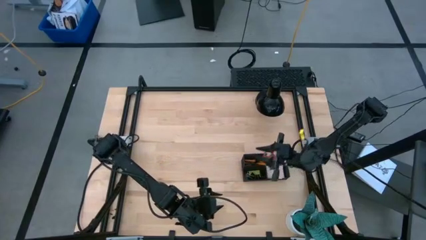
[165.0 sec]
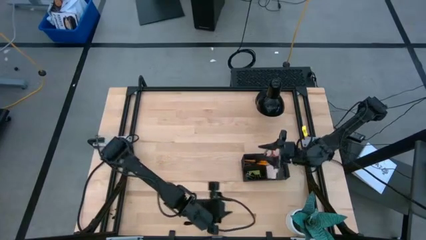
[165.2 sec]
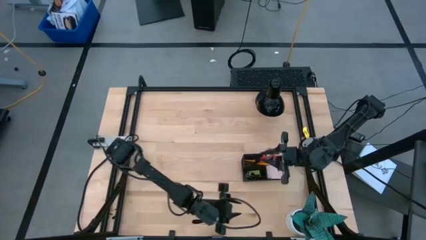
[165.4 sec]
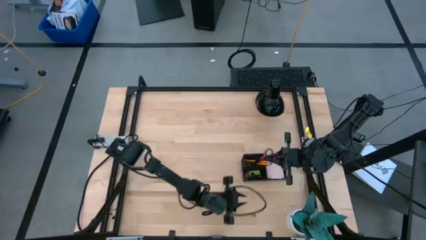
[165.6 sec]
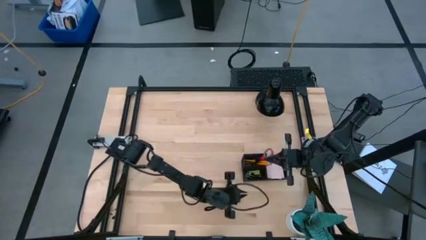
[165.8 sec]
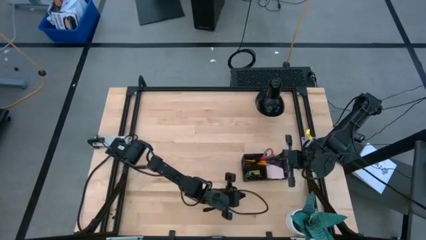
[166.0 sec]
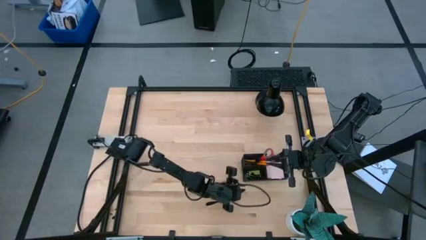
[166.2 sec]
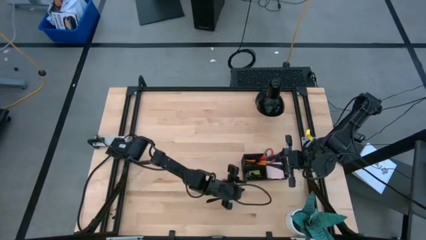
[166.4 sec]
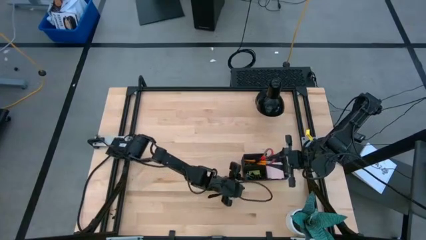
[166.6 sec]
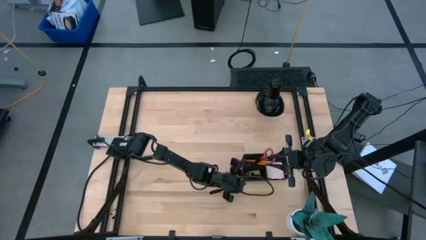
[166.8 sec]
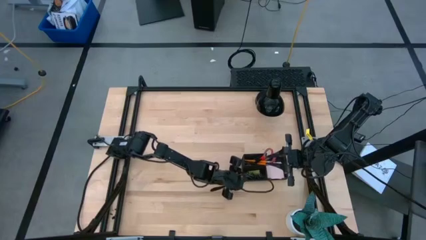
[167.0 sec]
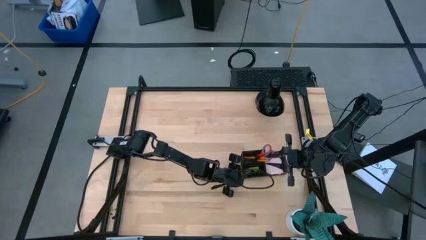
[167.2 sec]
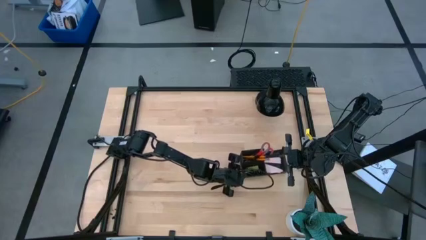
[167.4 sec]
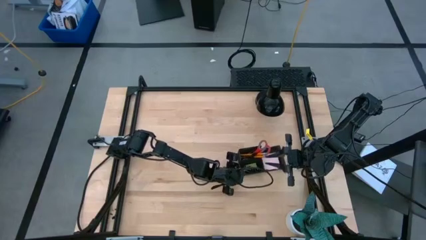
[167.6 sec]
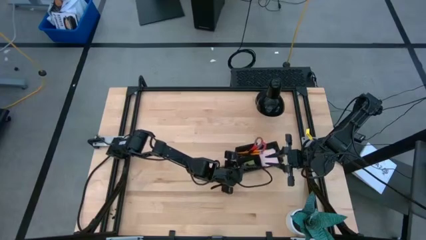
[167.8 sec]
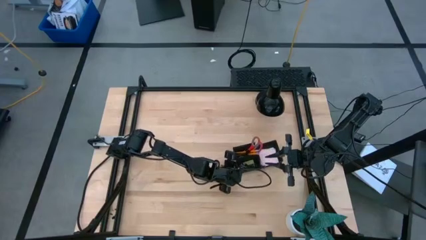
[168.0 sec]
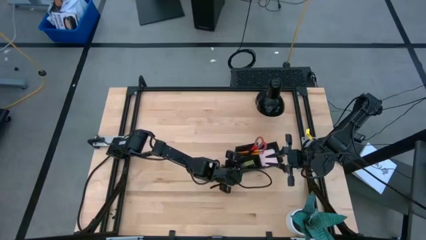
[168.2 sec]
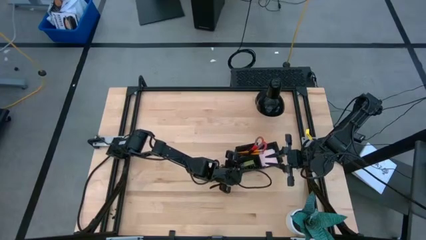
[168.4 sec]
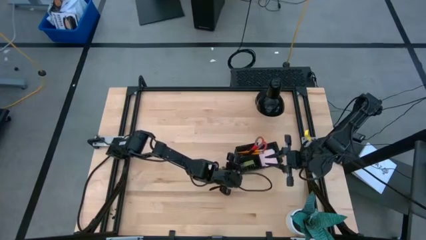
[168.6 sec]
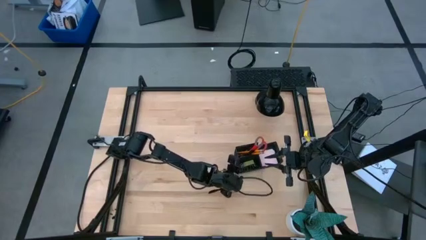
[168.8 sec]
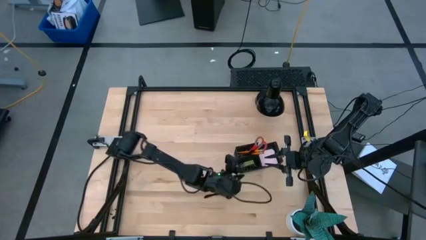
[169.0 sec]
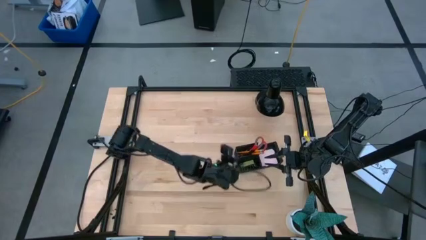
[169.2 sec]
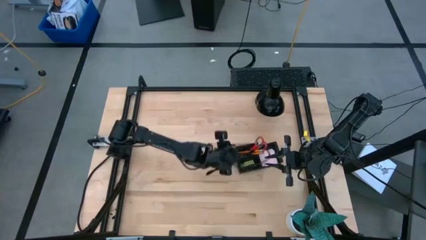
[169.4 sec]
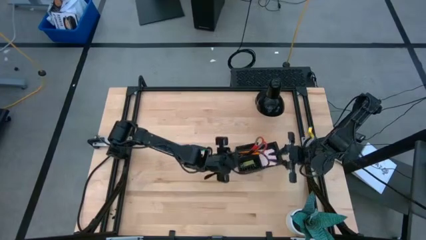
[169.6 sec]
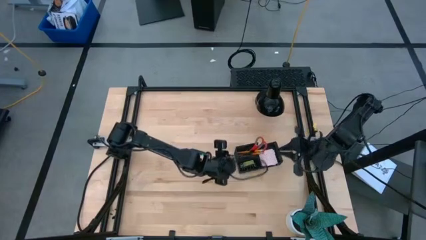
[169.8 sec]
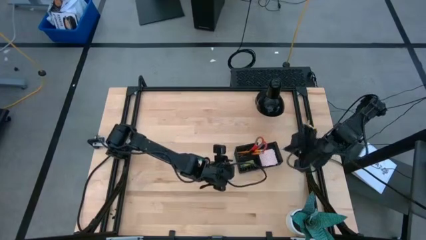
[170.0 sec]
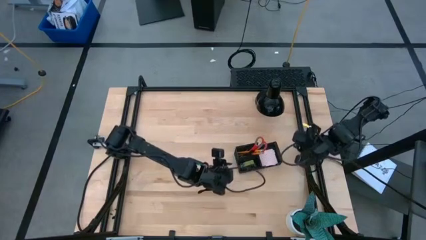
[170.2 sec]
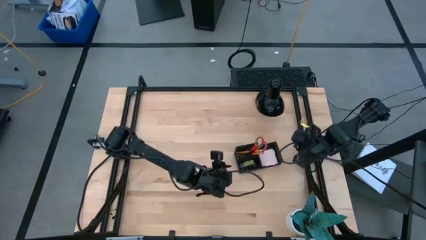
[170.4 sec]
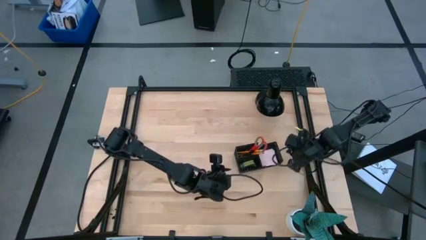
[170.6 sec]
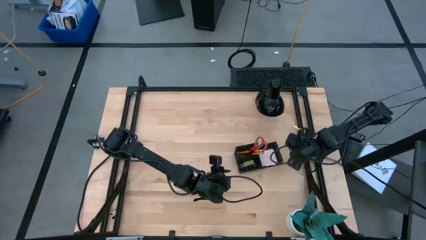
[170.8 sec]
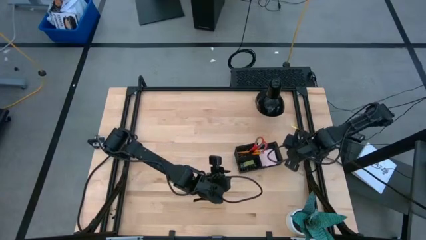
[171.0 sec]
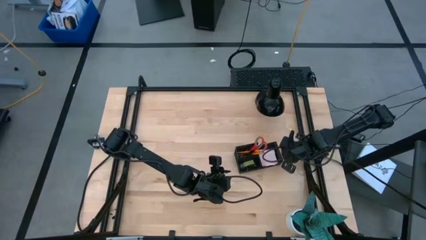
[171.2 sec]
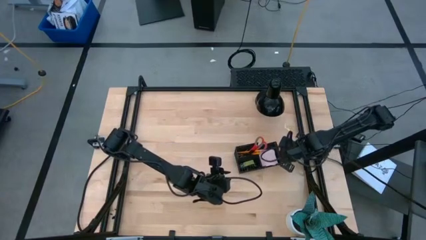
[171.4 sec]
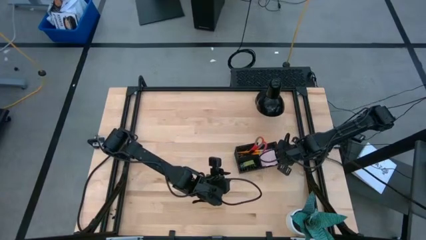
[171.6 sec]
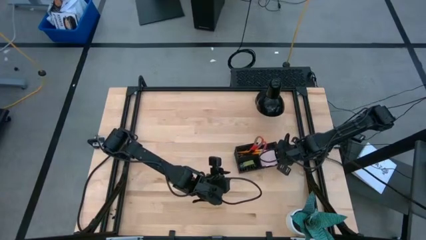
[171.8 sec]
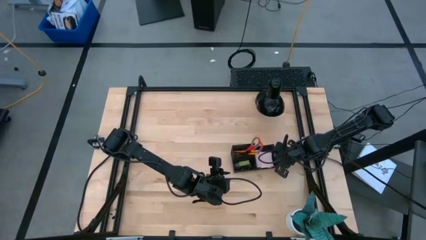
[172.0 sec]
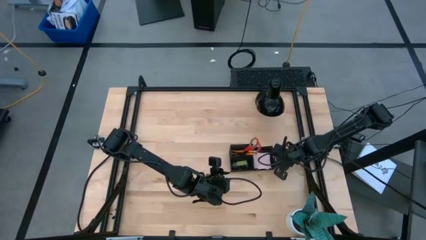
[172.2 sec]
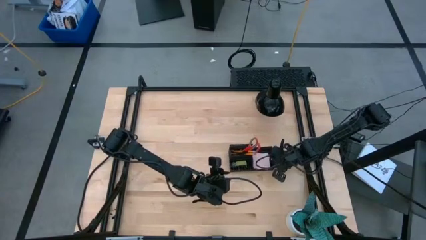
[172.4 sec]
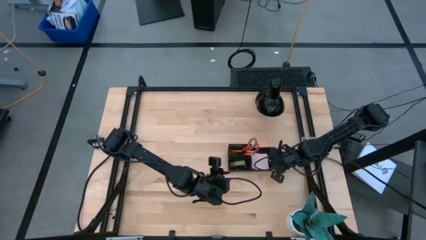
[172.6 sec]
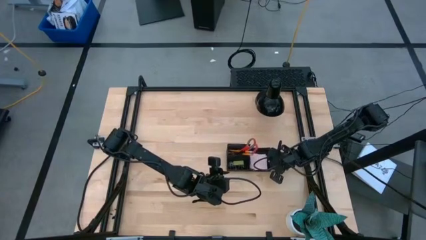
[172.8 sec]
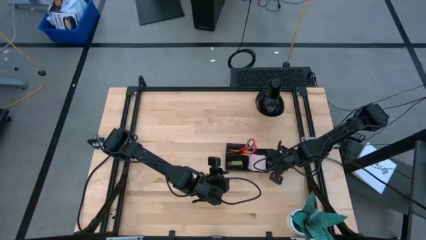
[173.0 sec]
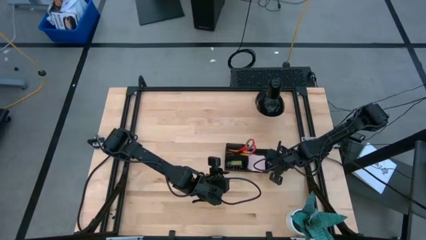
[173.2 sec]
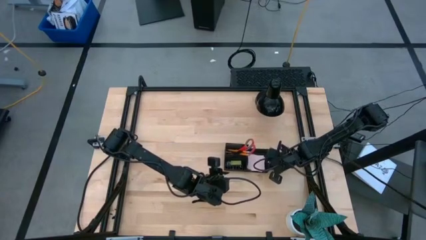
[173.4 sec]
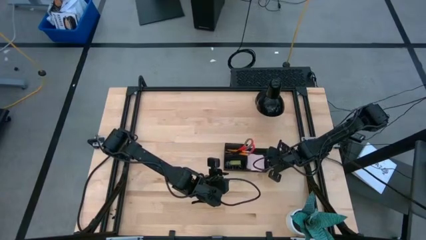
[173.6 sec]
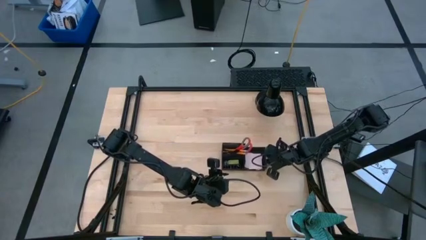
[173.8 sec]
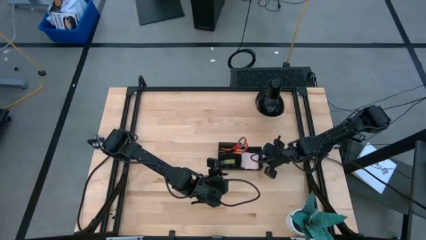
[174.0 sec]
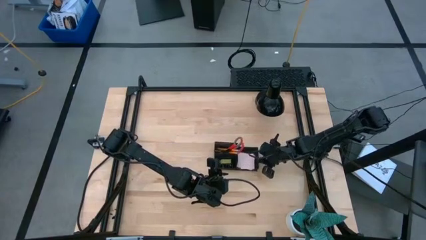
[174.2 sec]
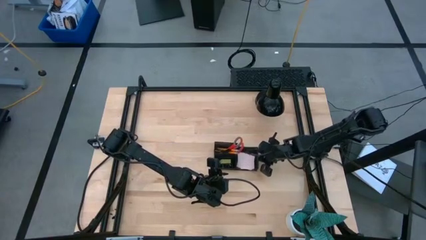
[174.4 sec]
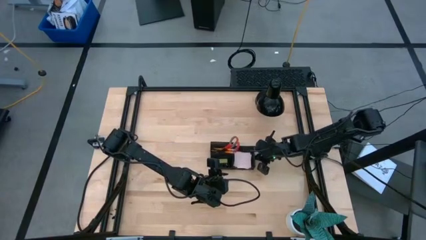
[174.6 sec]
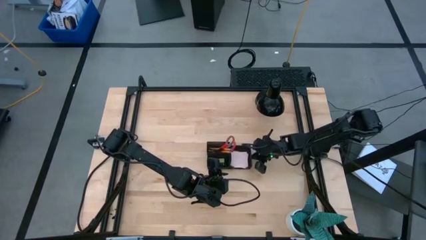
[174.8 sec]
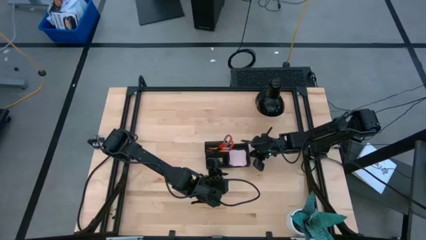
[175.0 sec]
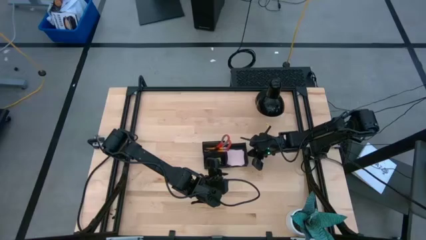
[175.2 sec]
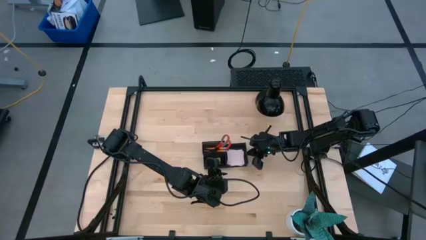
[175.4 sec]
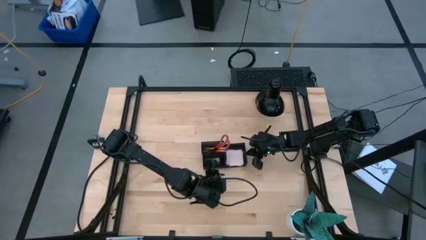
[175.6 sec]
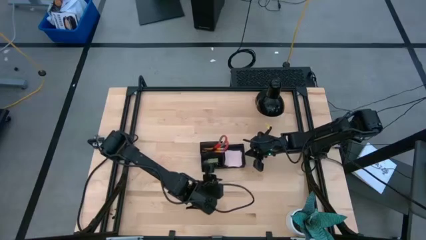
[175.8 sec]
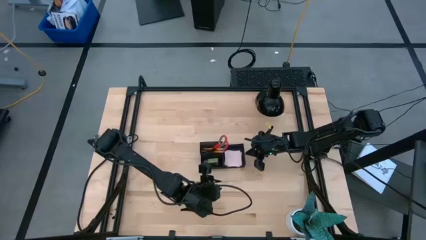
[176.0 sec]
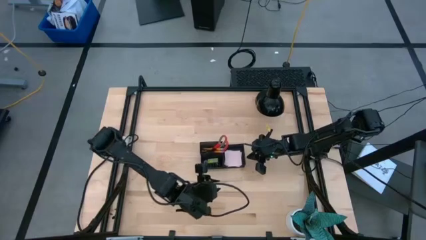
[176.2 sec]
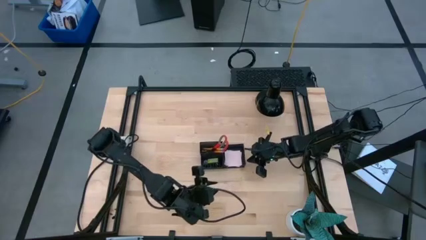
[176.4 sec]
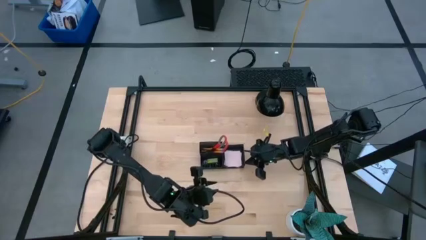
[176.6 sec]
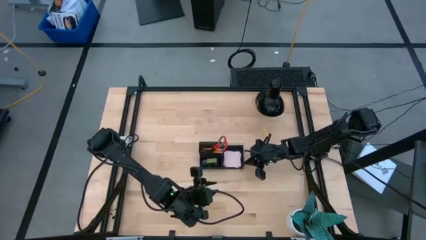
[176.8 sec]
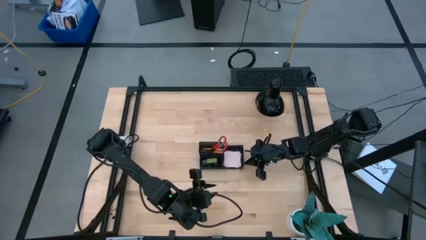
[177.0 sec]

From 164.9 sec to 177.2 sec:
Task: Pick and place office supplies into organizer
Adjust the black desk organizer
